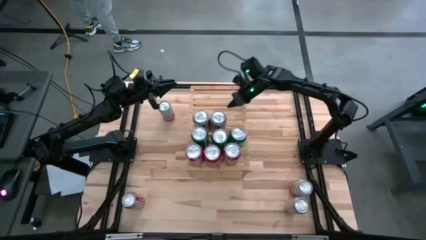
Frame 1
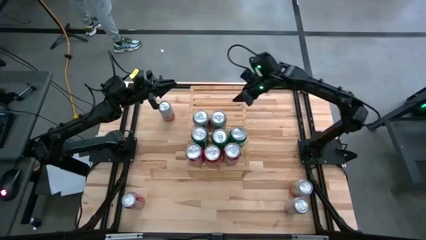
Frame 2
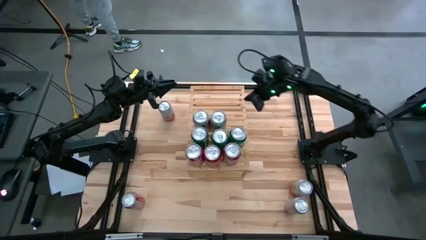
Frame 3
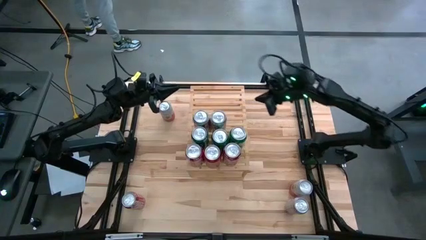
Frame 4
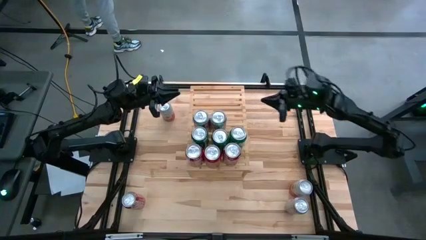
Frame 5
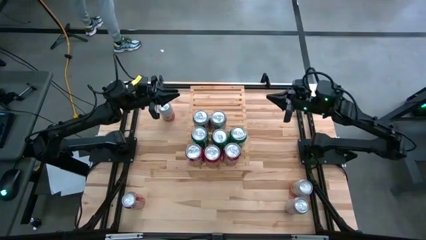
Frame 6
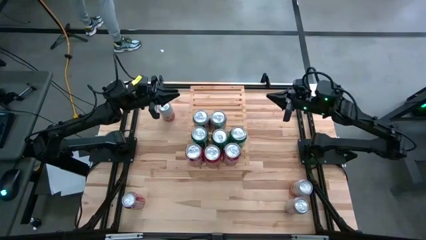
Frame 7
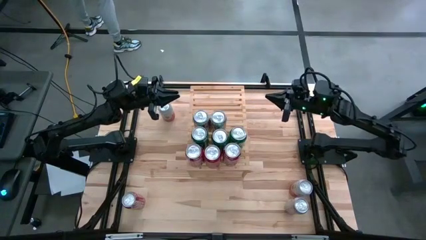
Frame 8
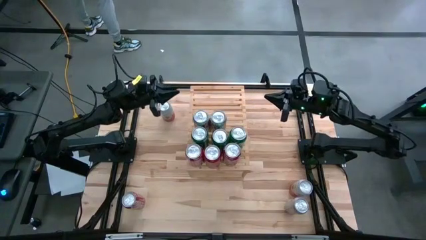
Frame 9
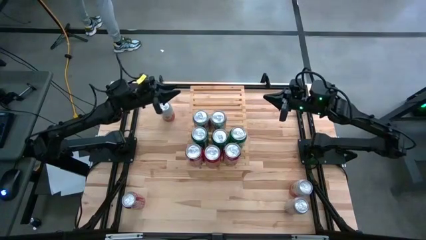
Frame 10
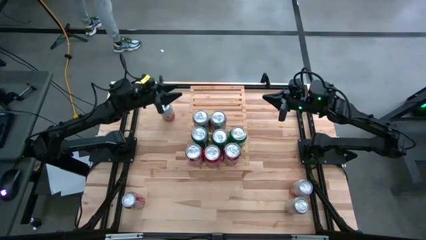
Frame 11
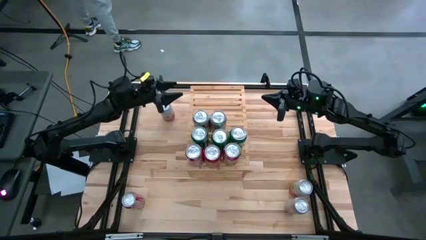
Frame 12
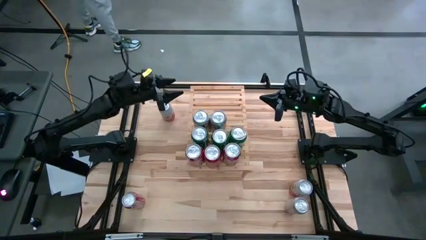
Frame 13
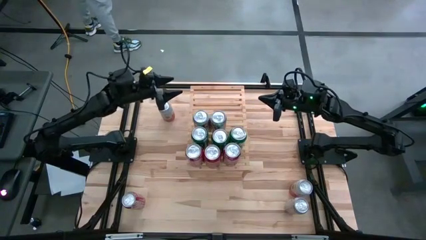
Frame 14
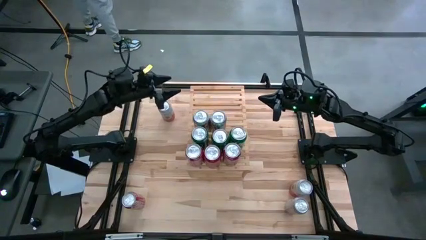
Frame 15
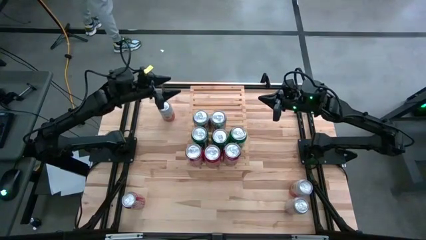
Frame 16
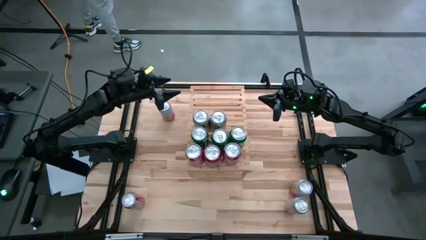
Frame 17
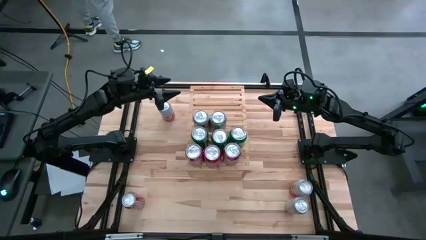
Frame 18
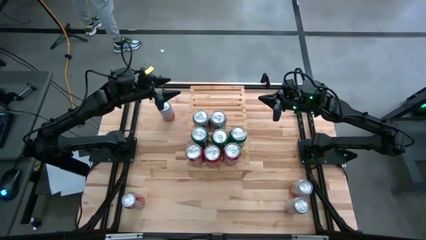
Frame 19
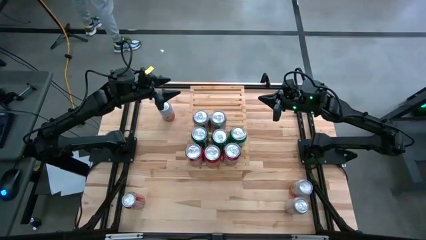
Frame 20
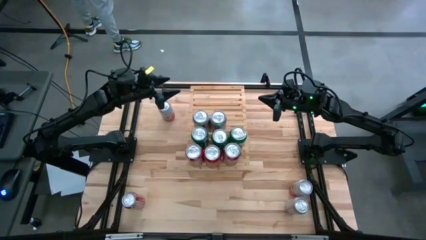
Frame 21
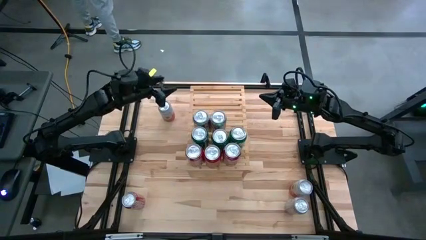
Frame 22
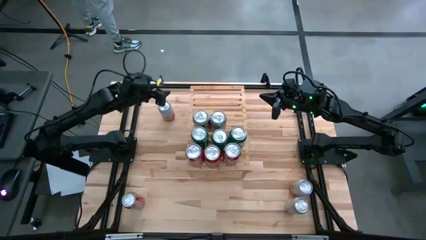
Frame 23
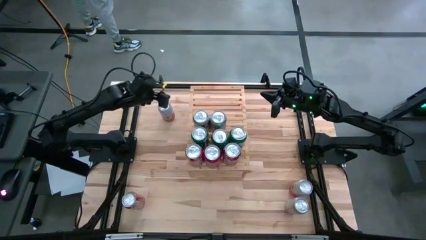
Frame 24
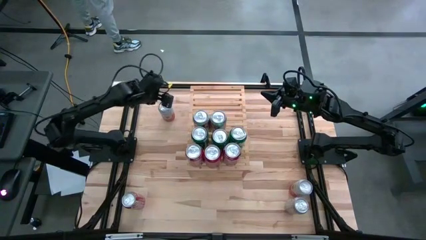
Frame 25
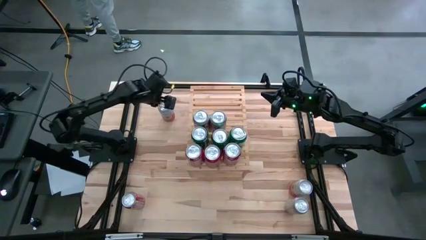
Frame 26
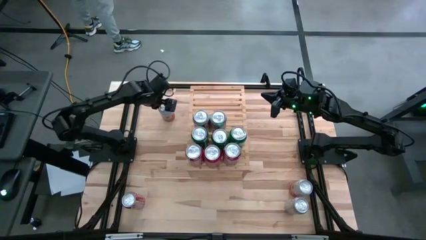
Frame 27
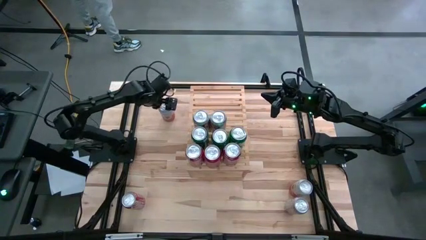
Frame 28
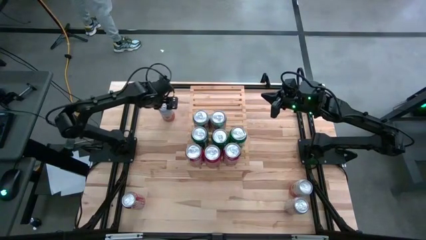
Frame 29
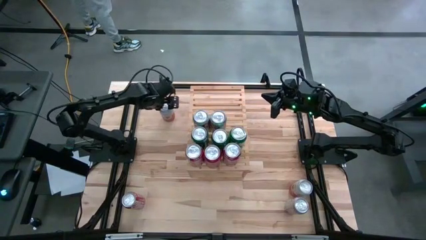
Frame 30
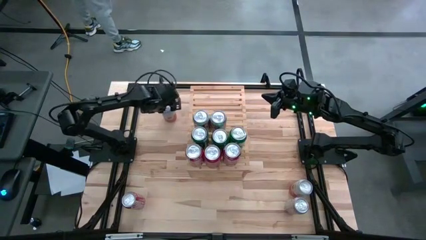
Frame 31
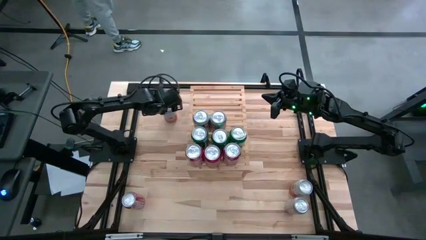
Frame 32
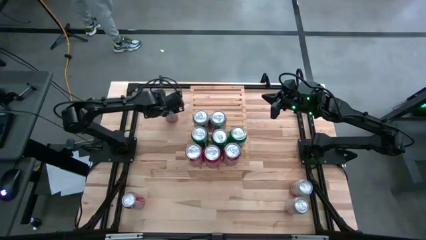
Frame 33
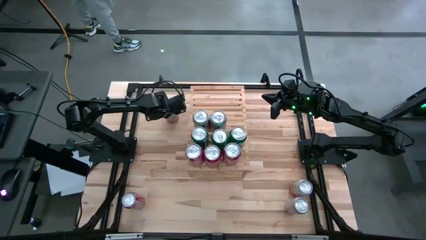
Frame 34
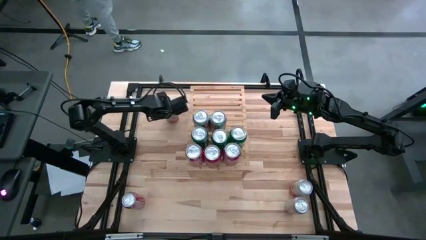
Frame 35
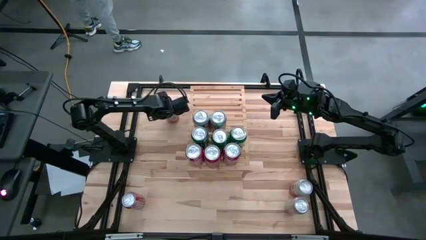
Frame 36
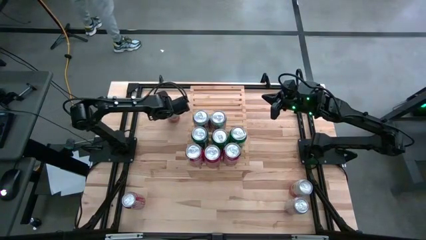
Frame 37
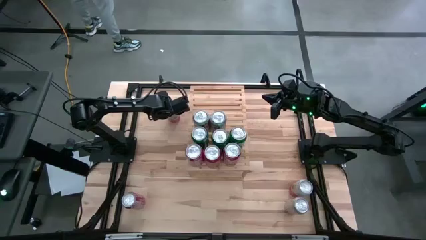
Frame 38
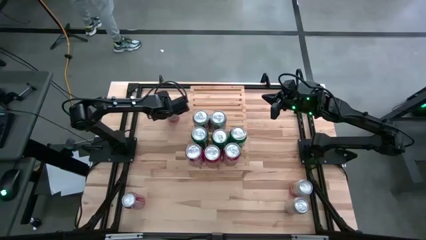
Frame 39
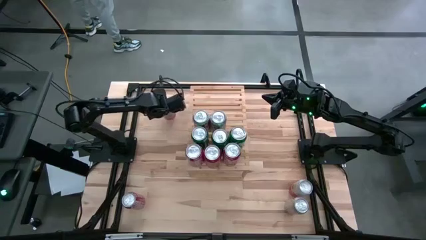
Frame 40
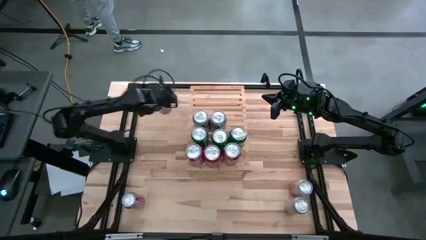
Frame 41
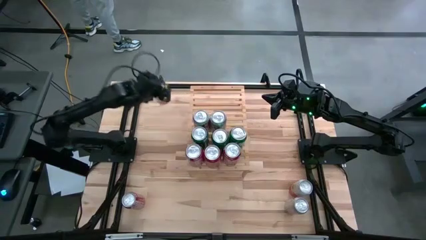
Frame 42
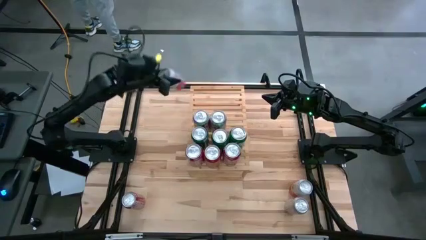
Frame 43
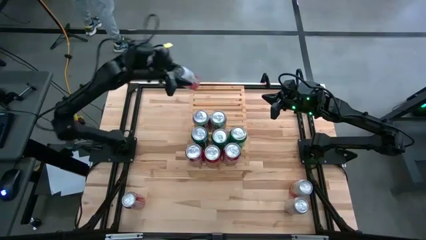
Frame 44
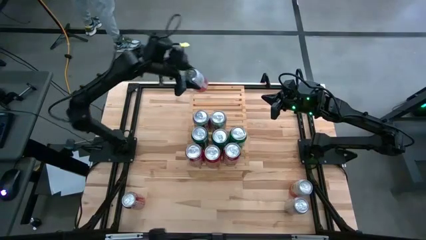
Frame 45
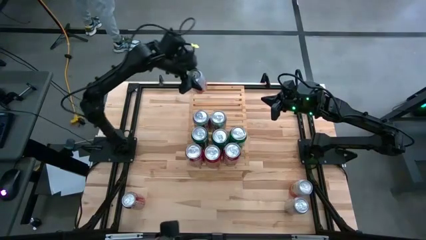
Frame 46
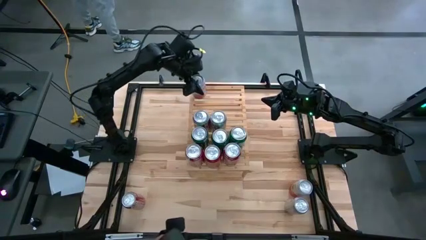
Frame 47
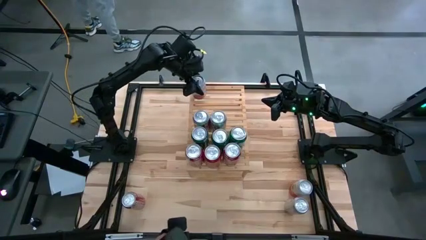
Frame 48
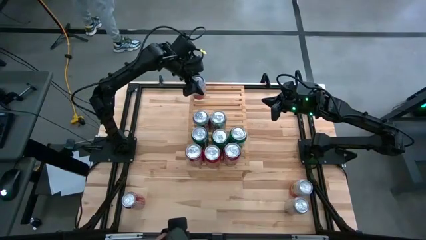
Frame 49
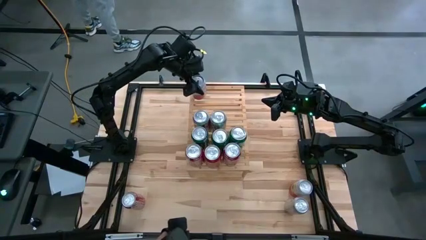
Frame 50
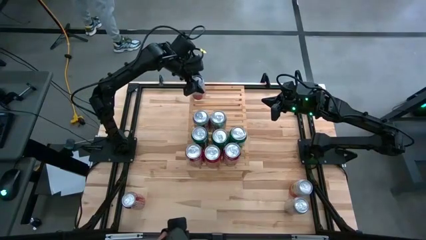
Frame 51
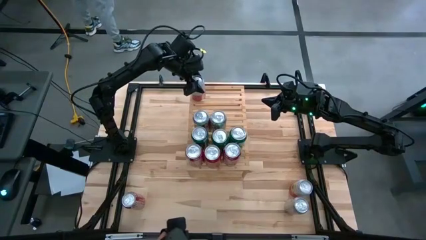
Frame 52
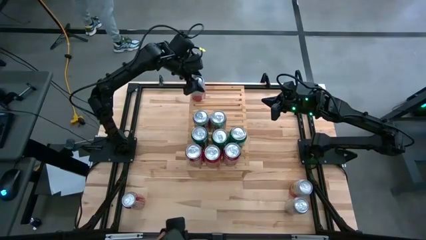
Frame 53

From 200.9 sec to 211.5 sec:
Task: Place canned beverage on shelf
Put the top white-pink soda can on the shelf

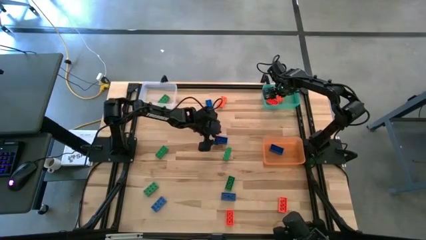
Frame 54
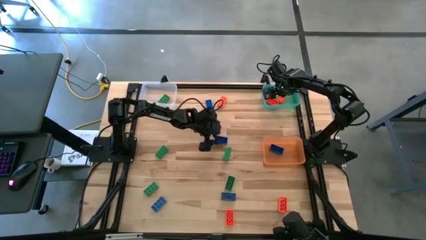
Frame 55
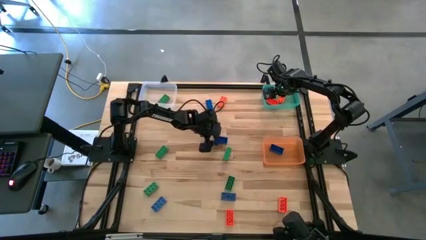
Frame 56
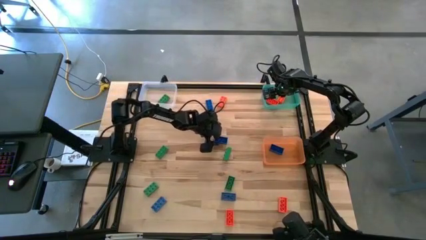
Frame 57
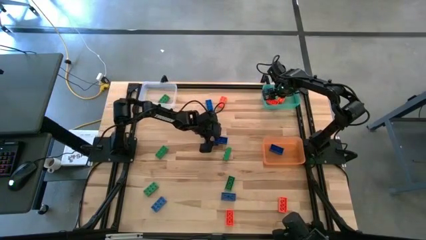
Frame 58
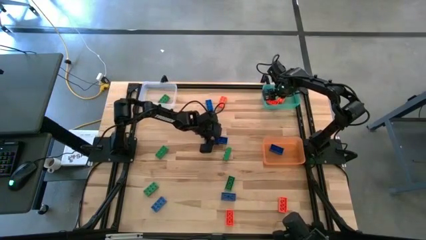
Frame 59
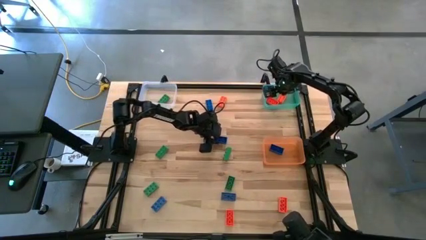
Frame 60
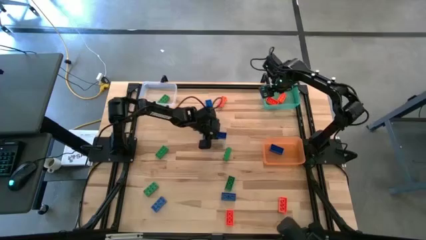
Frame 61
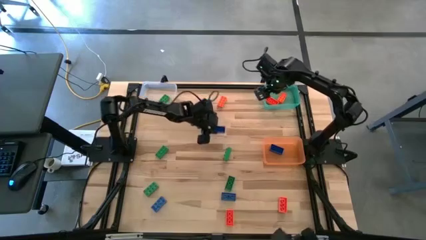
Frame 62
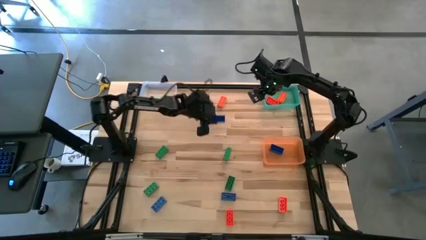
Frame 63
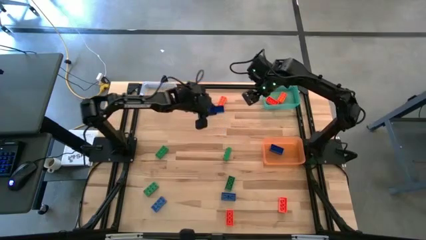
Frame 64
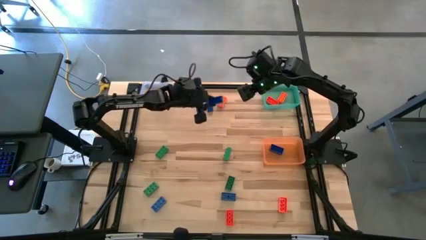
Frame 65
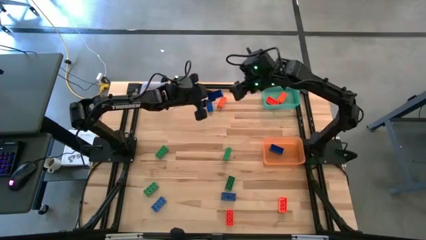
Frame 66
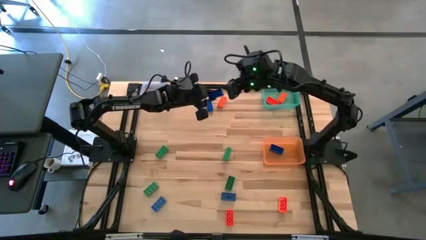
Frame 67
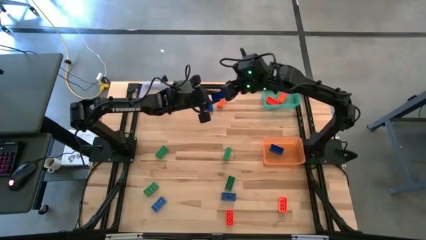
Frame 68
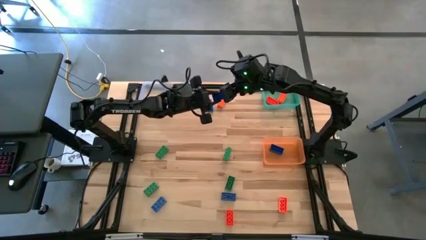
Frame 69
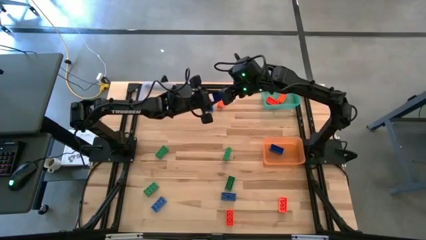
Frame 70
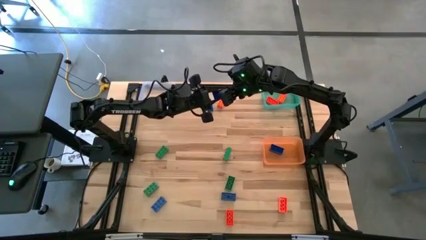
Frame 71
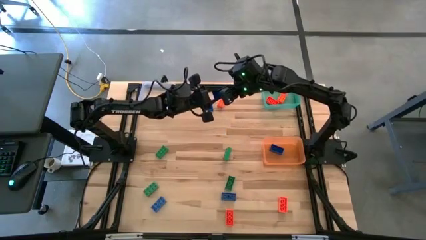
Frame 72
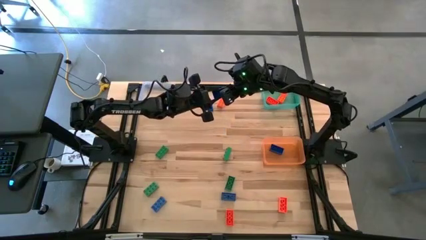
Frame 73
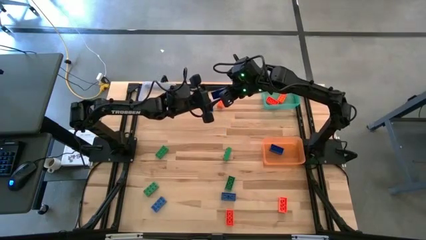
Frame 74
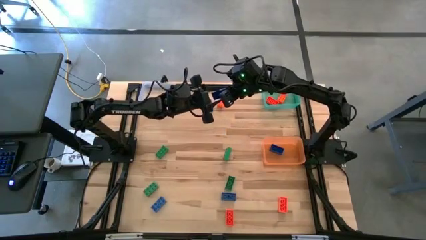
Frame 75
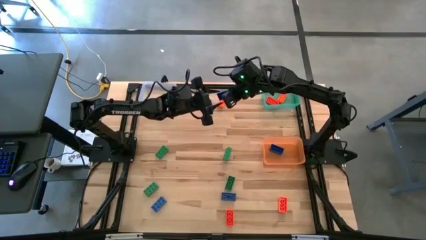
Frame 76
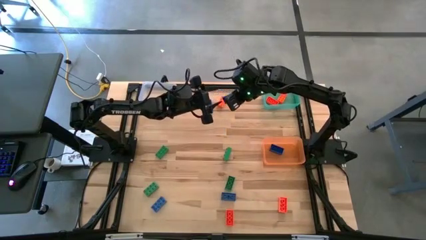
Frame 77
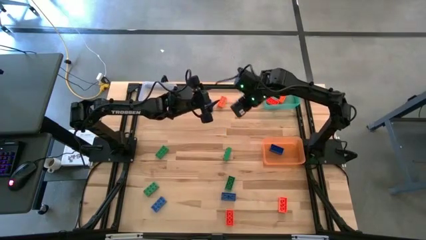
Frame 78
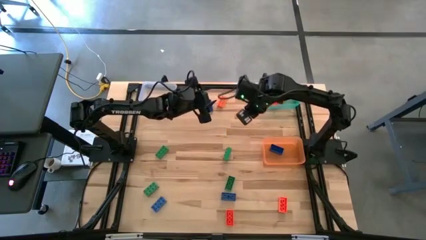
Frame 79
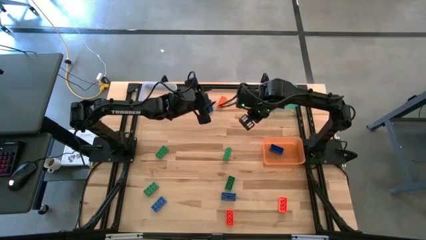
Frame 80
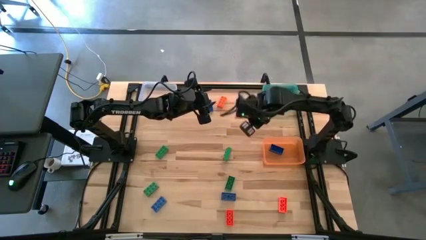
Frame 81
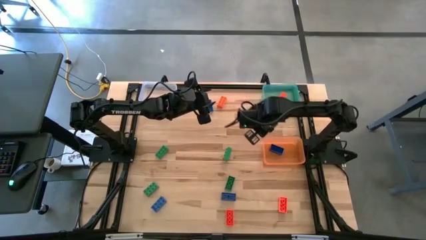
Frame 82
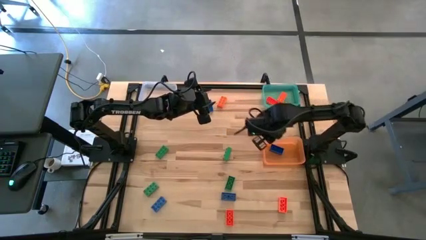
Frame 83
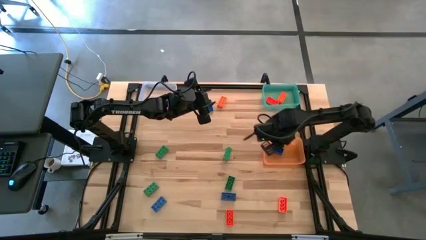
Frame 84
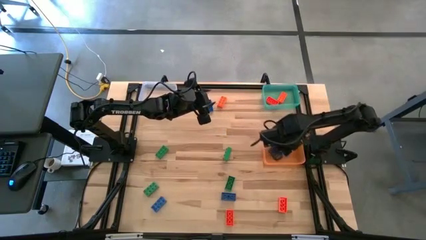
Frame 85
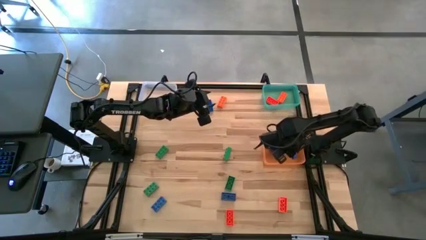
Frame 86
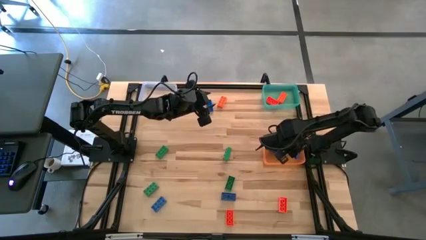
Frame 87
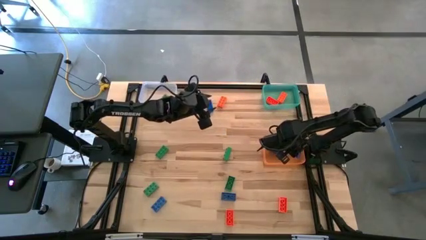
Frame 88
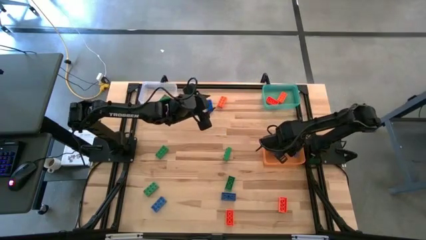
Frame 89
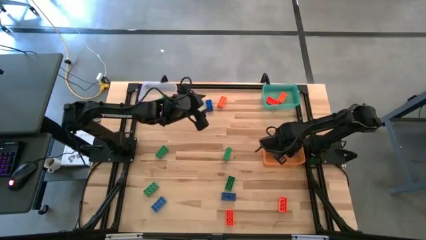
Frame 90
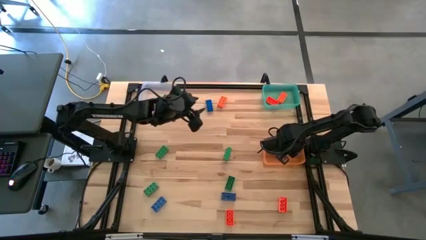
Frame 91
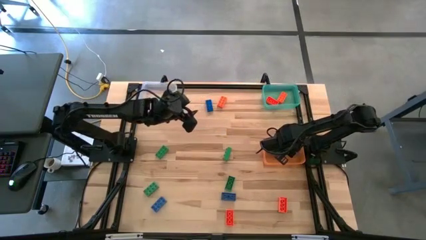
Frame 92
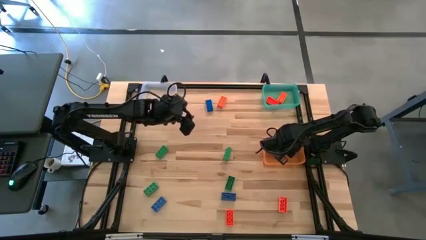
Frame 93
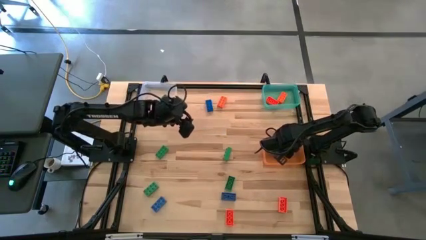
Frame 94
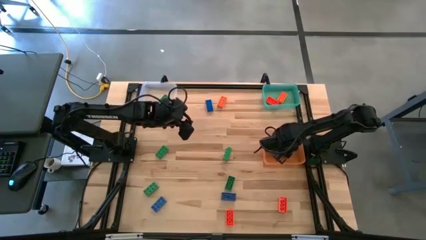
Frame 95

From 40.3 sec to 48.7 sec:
Task: Sort & place blocks by color
Put the blue game piece into the orange bin
